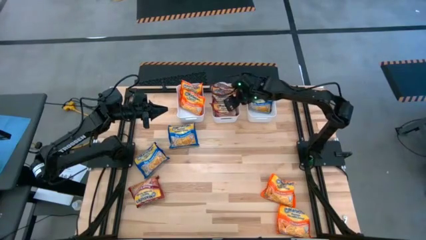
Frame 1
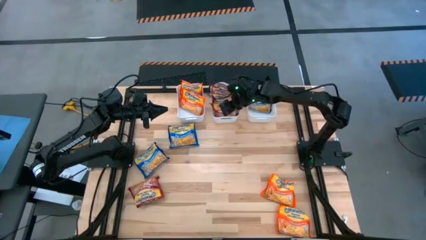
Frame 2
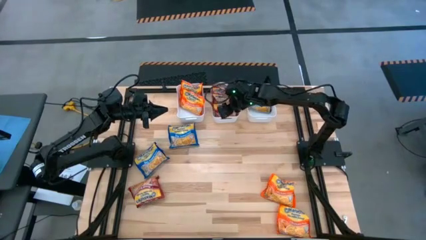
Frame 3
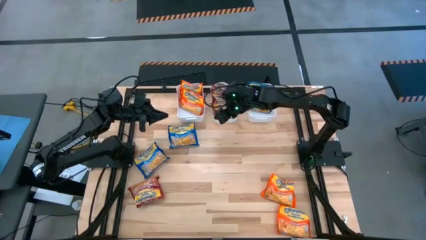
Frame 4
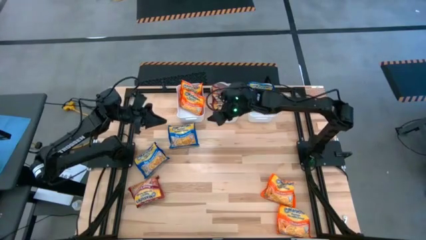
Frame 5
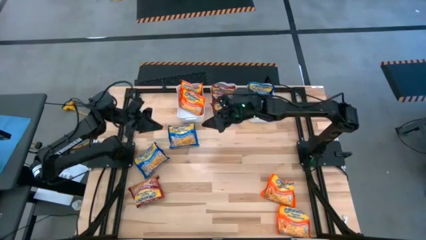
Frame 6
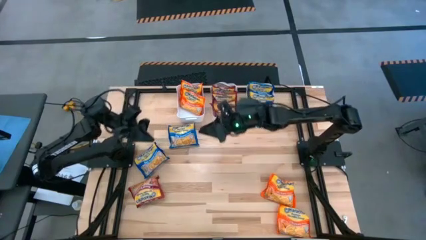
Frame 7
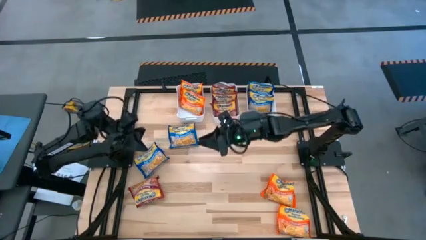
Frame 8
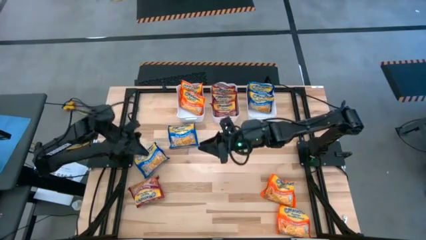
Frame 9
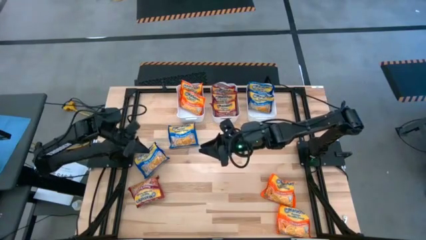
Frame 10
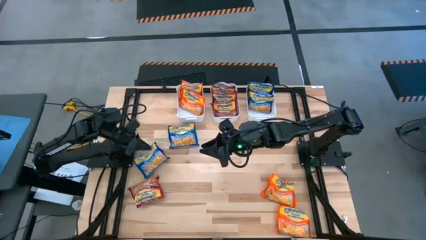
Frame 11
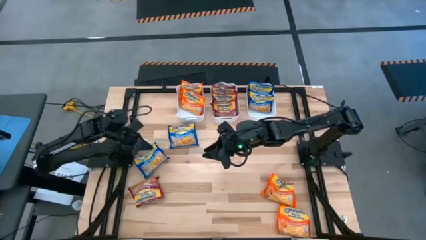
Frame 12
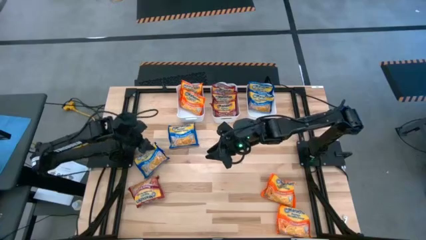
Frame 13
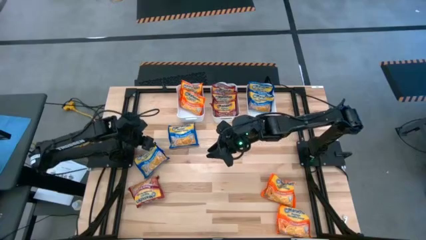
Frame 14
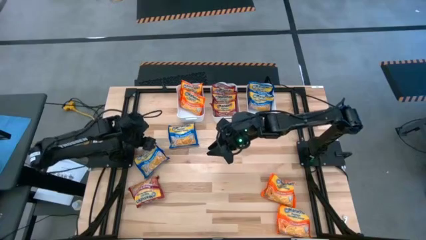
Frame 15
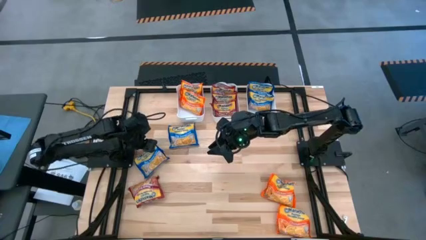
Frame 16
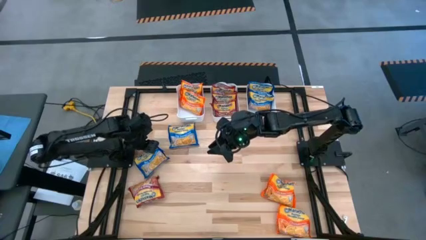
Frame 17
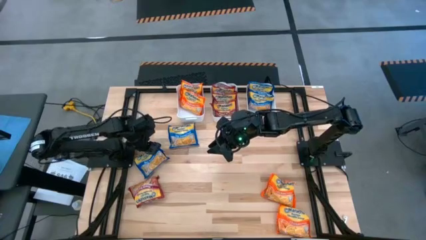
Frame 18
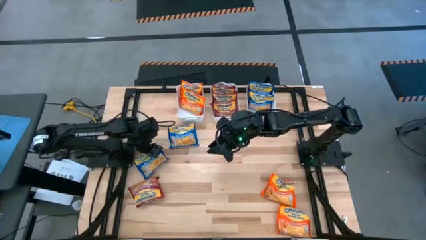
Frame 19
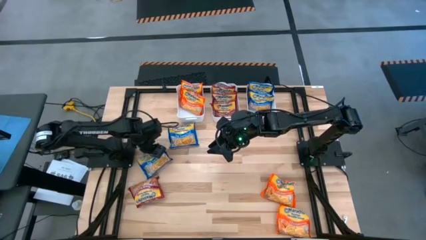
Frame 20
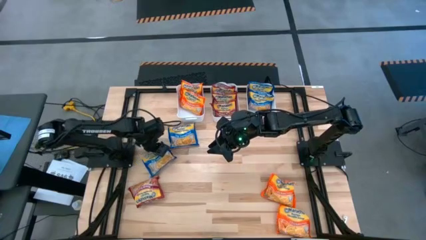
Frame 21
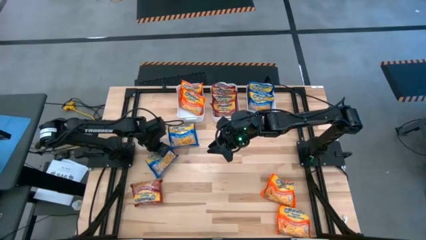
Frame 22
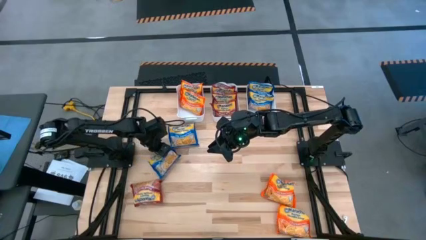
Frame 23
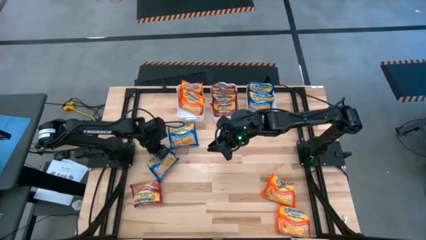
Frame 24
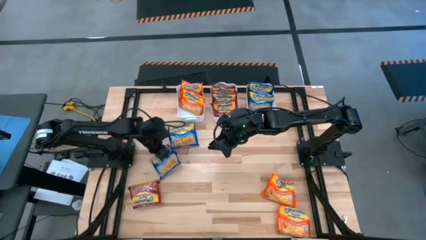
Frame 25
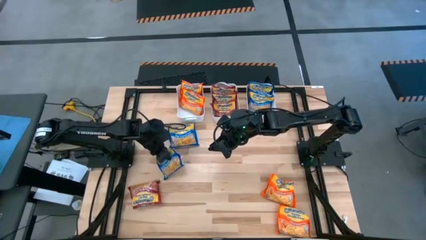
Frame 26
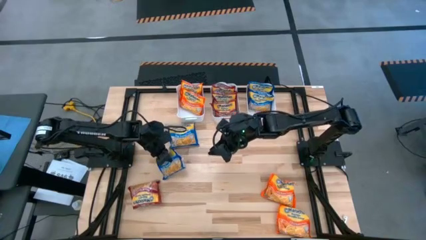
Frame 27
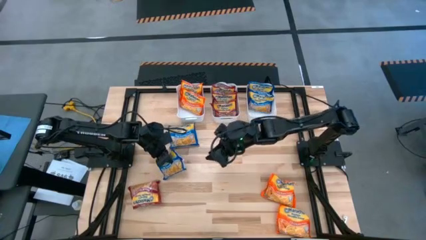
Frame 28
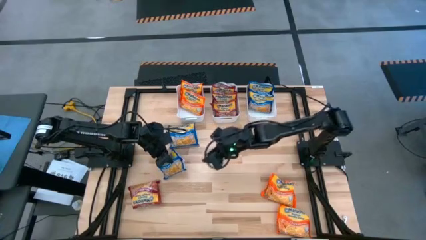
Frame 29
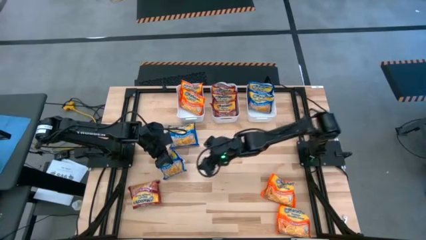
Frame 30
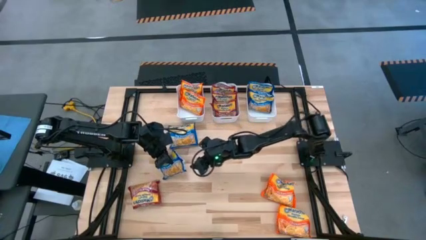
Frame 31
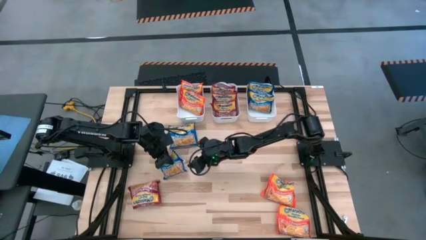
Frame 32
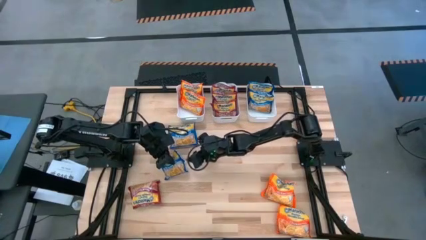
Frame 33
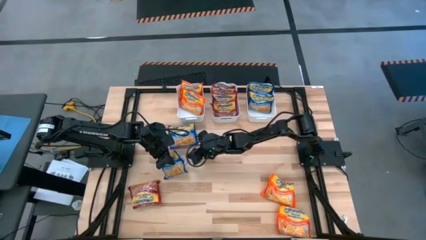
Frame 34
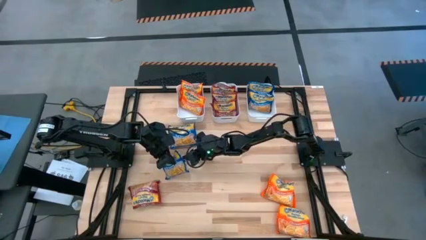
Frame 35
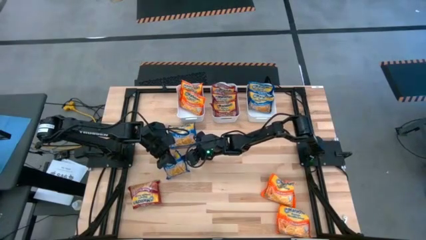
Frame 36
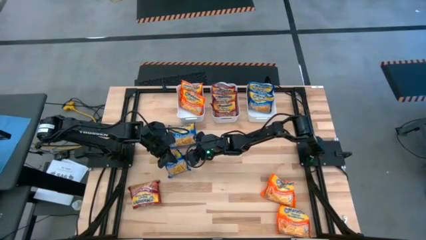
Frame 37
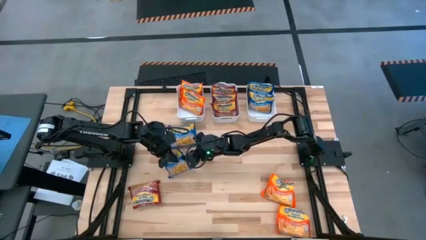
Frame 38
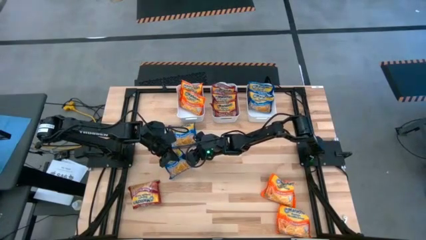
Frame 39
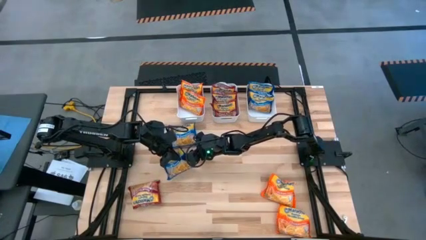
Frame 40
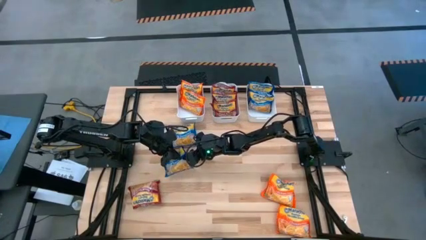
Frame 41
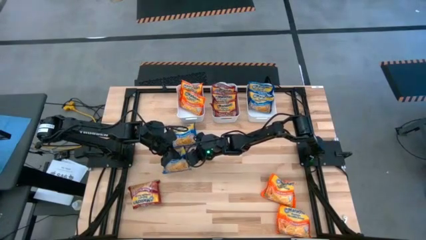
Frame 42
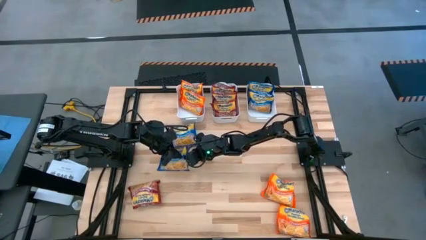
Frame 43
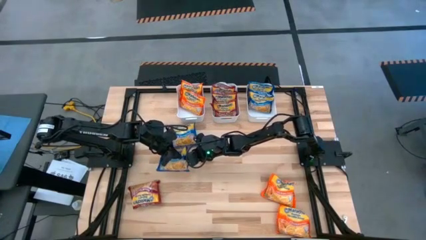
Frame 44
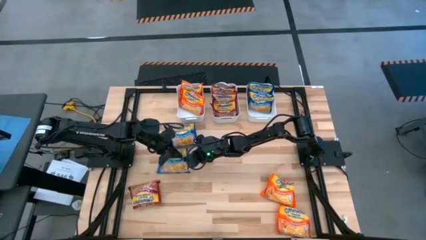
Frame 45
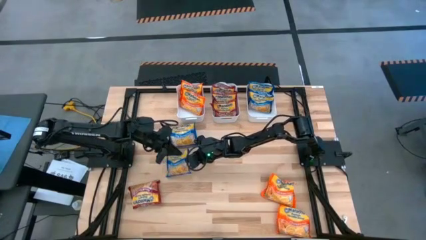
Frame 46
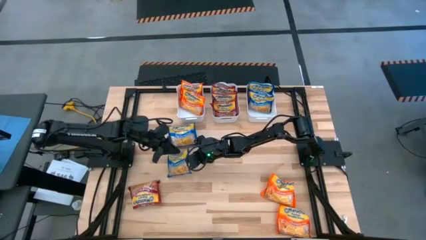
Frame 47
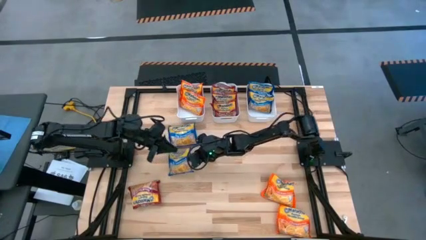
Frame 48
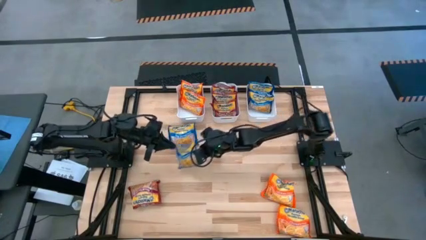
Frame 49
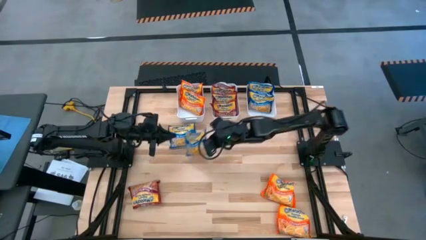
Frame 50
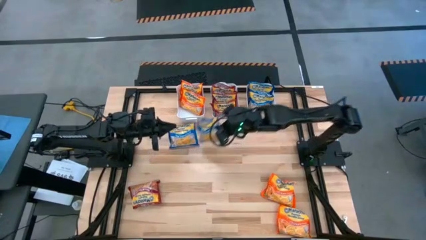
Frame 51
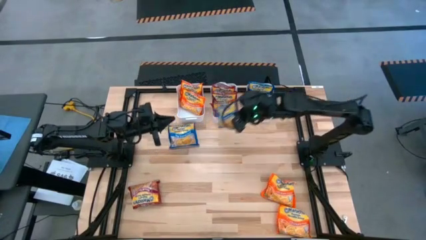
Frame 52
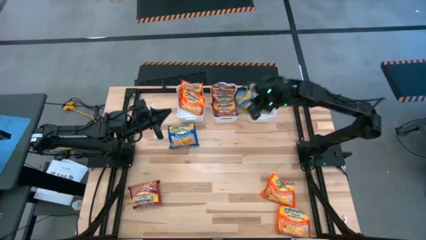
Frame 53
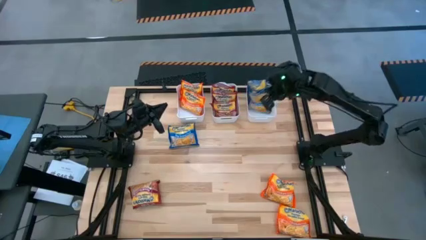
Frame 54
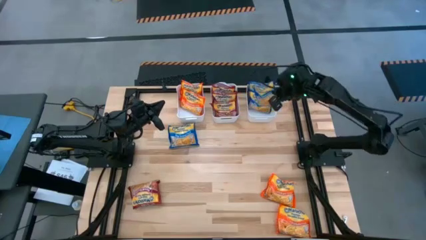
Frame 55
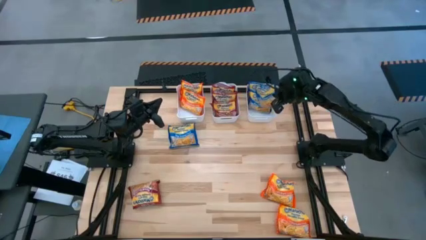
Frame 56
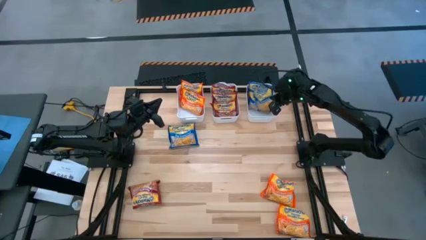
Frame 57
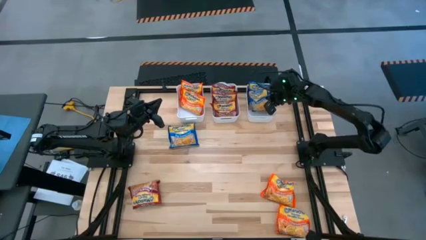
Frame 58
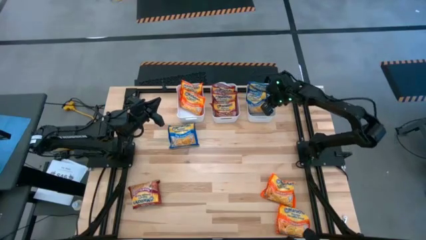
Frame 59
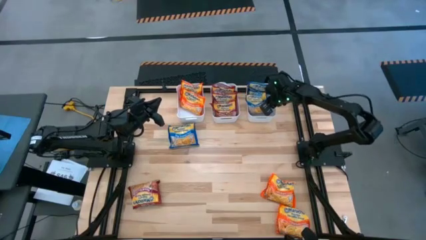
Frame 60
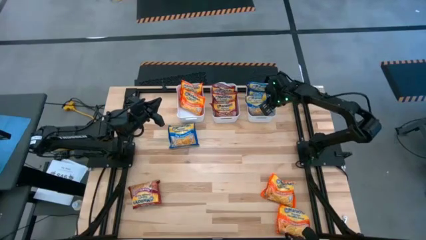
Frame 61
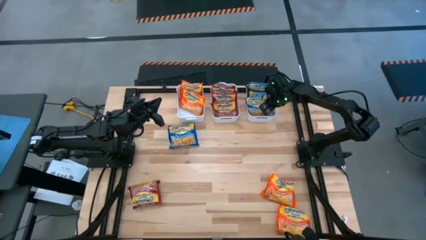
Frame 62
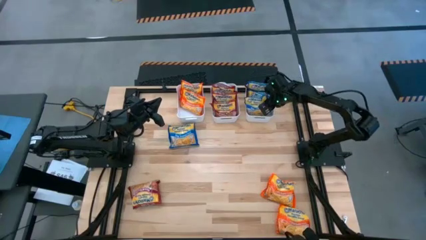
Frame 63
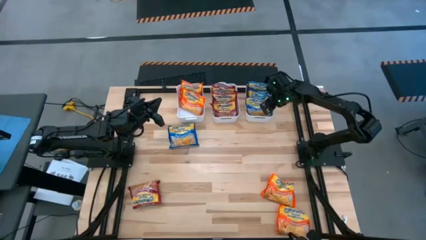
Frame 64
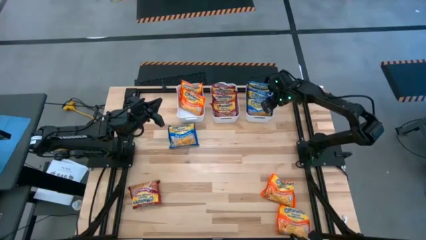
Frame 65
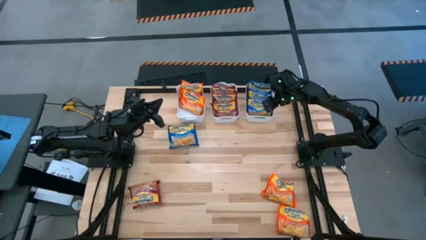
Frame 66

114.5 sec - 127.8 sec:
Task: Sort Maruchan noodles
Put the blue noodle pack into the right white bin

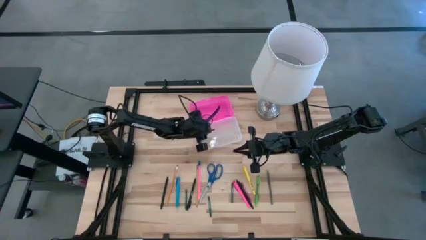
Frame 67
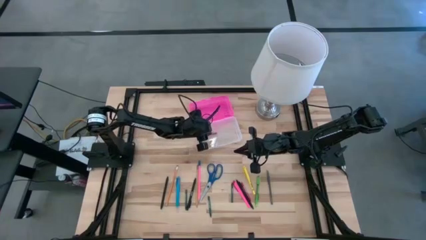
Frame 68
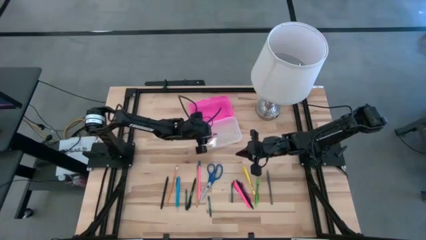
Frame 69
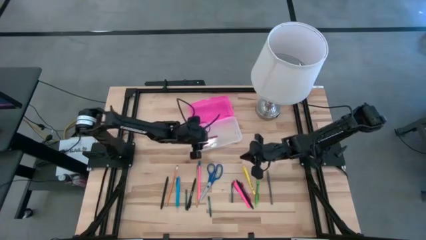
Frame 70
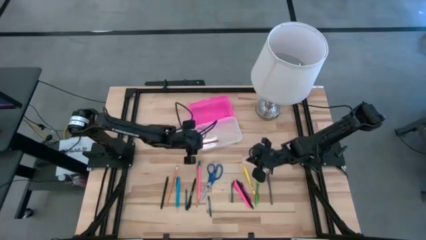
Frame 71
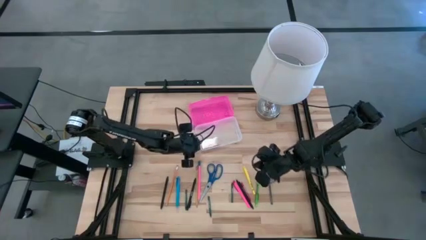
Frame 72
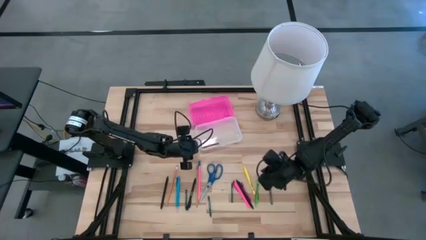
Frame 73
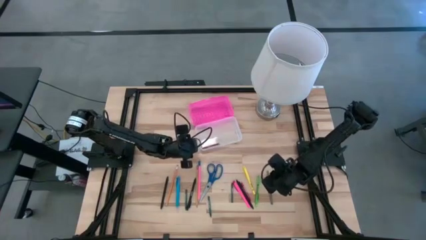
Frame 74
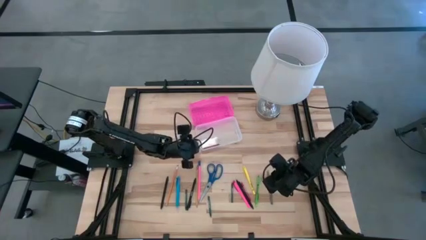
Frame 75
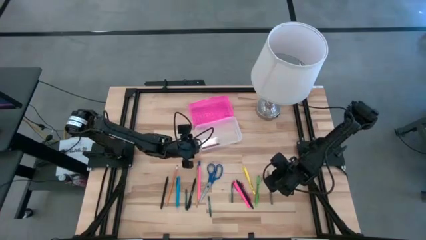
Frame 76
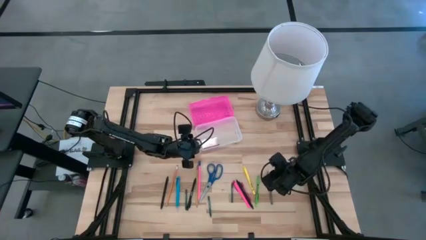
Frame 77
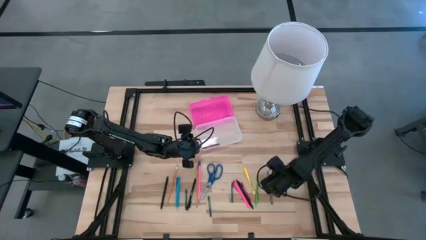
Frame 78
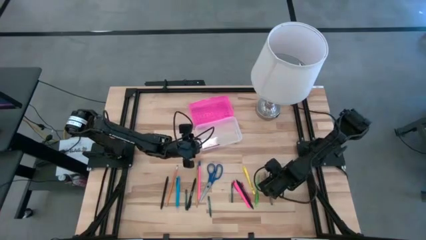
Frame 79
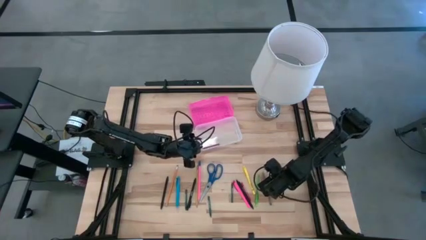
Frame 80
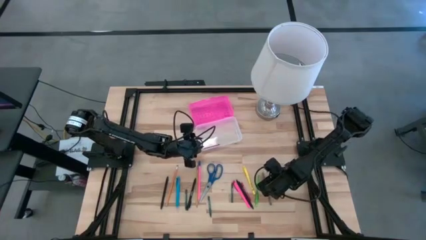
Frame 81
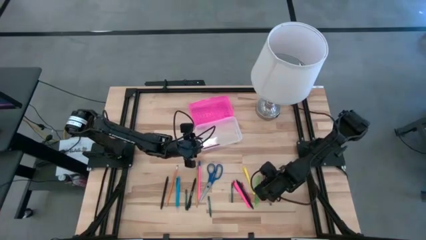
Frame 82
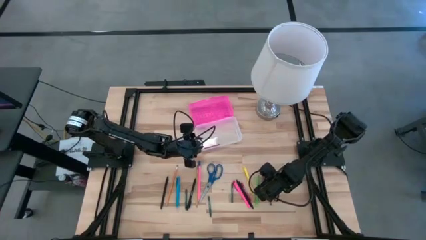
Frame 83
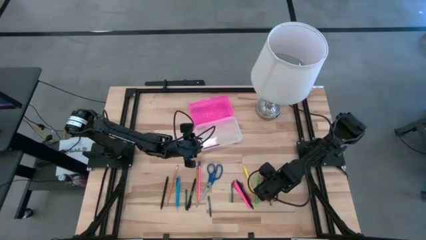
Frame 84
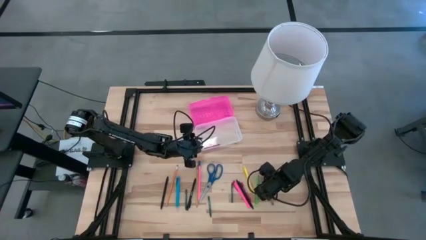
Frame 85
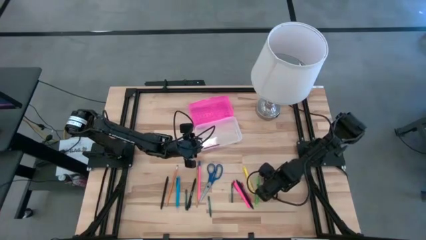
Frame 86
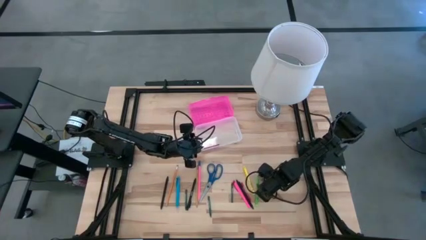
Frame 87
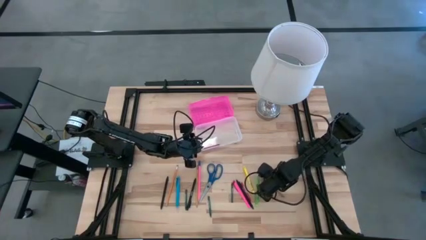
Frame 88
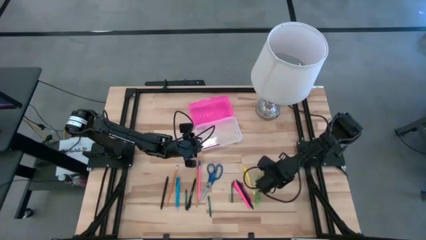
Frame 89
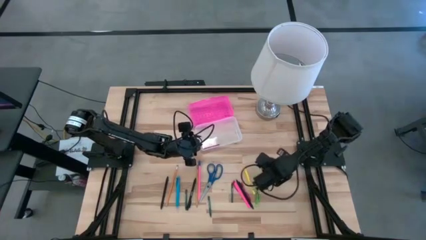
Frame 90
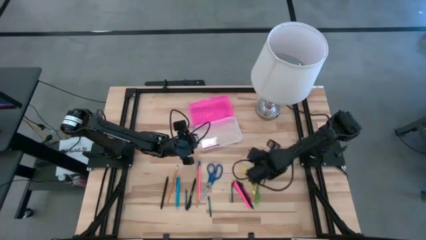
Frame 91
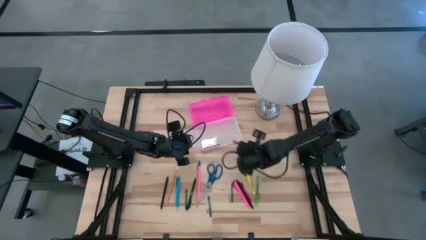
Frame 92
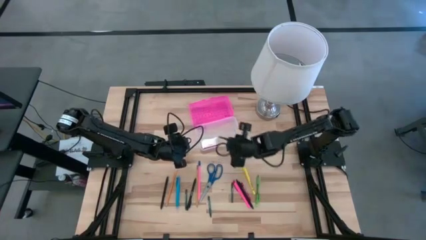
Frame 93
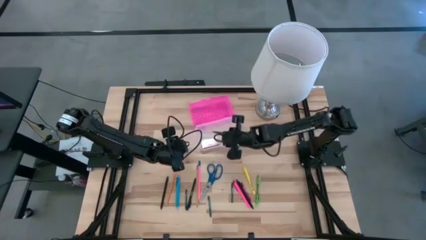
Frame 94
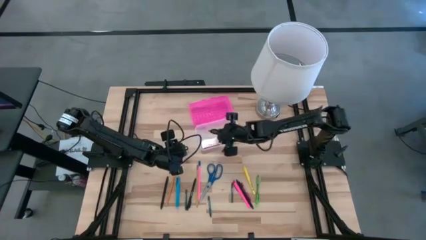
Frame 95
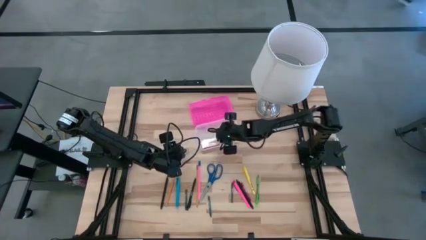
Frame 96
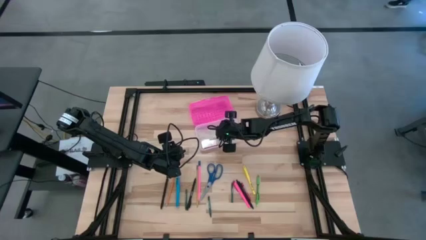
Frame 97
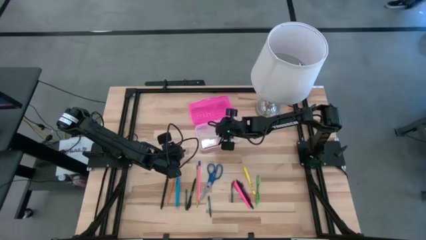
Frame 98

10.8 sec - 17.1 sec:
Task: Pick & place school supplies into a supply box
Put the gray pen into the pink supply box
